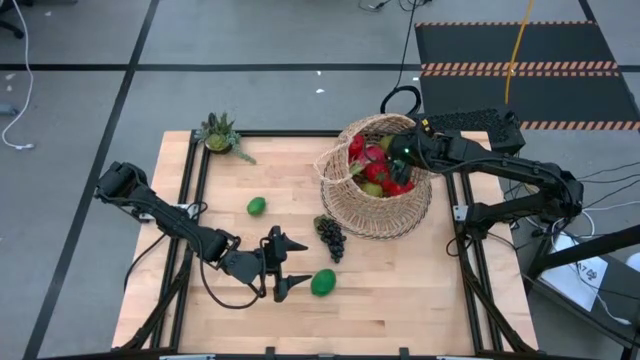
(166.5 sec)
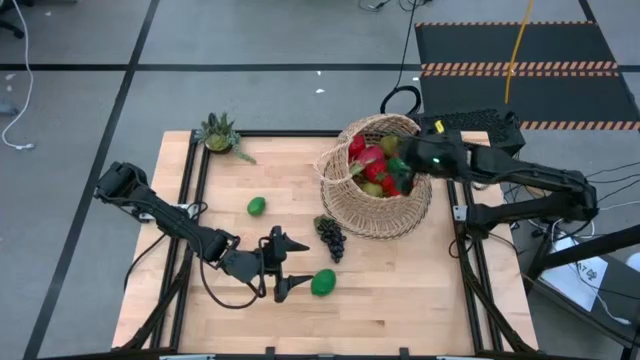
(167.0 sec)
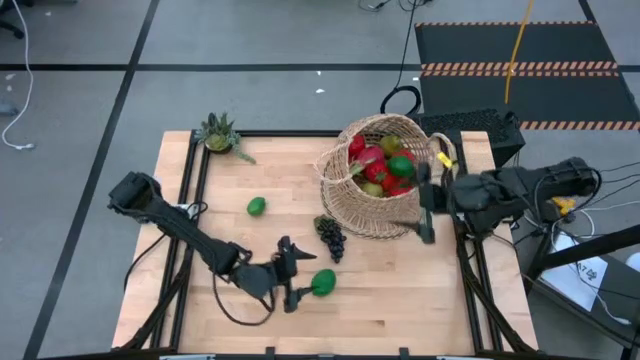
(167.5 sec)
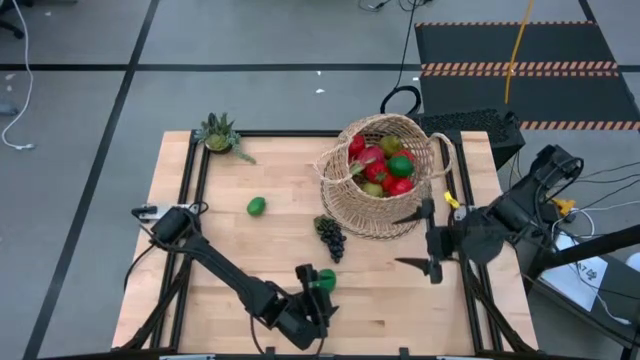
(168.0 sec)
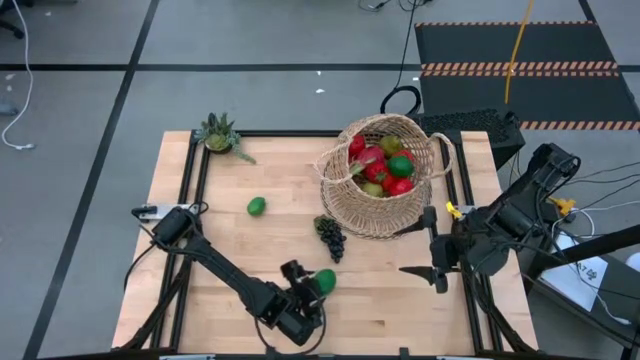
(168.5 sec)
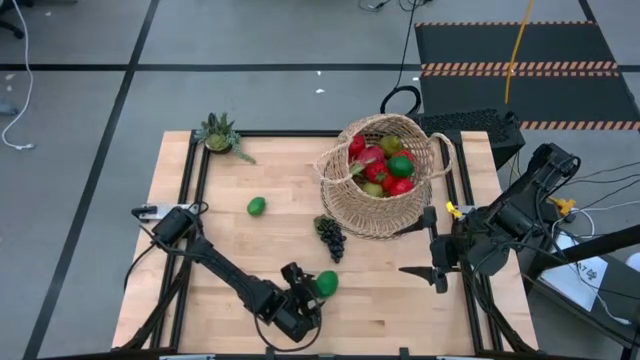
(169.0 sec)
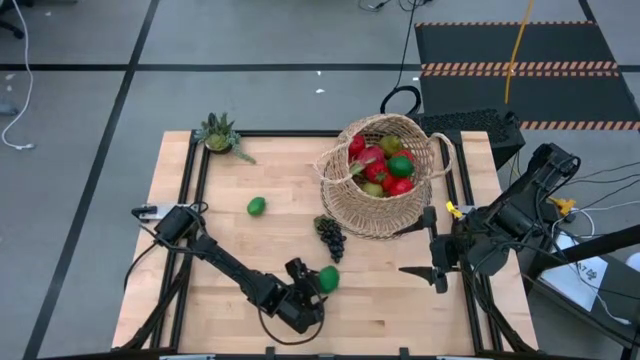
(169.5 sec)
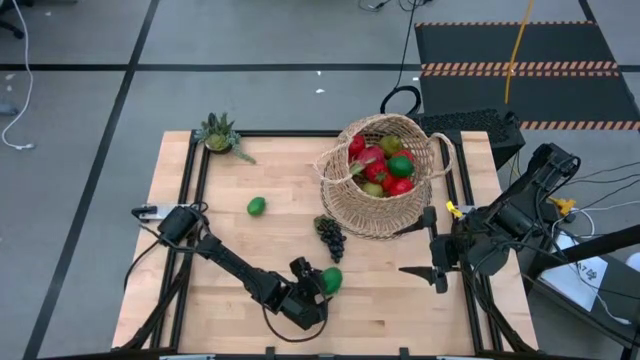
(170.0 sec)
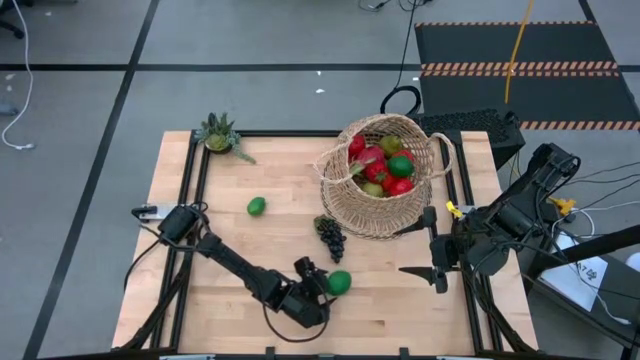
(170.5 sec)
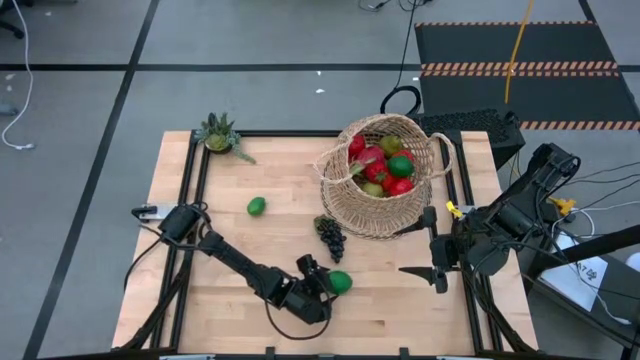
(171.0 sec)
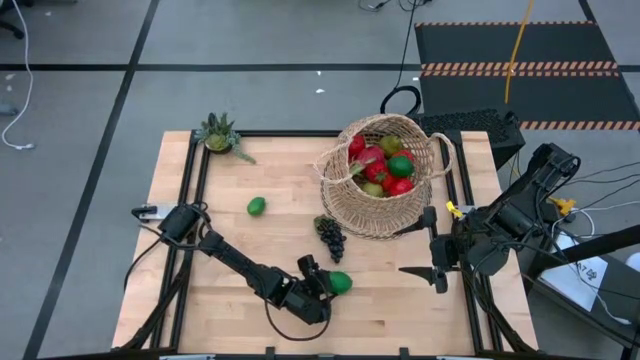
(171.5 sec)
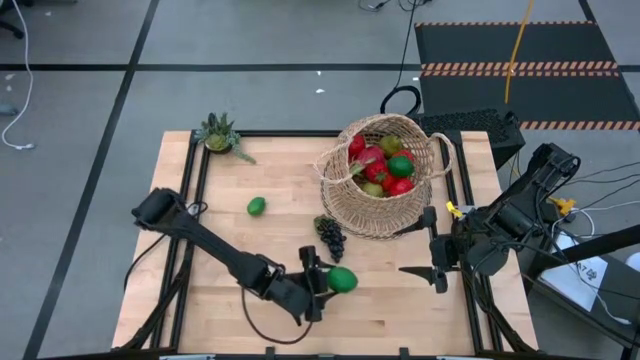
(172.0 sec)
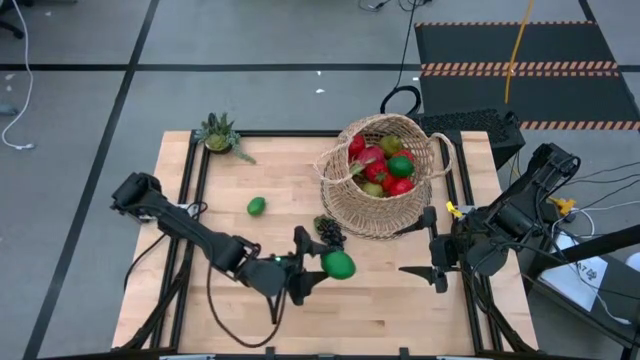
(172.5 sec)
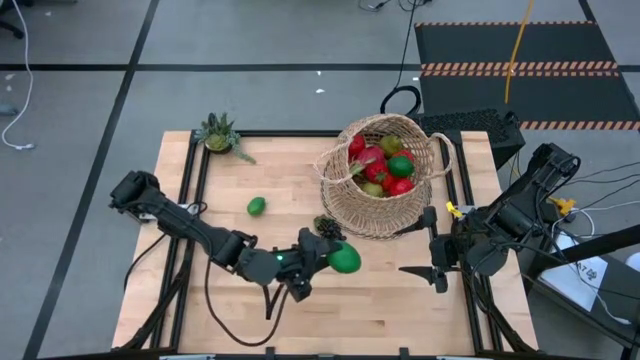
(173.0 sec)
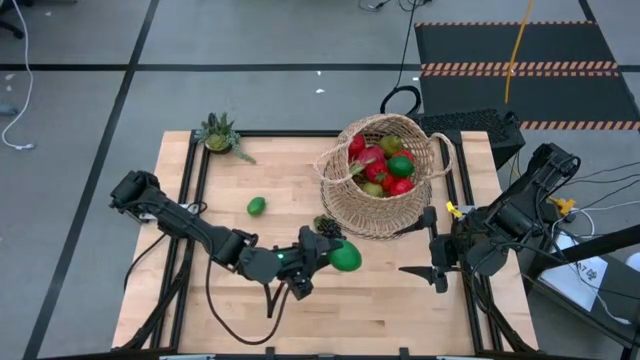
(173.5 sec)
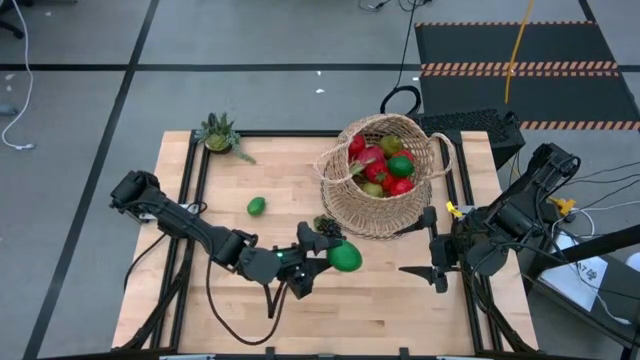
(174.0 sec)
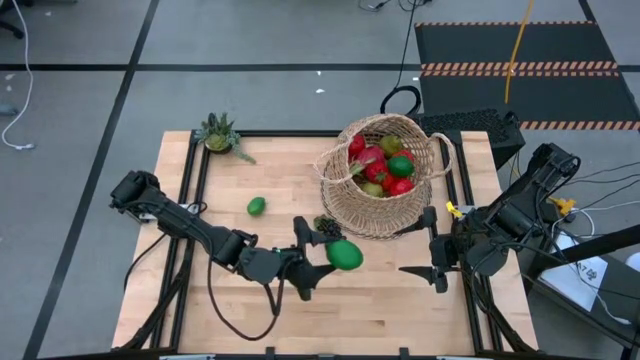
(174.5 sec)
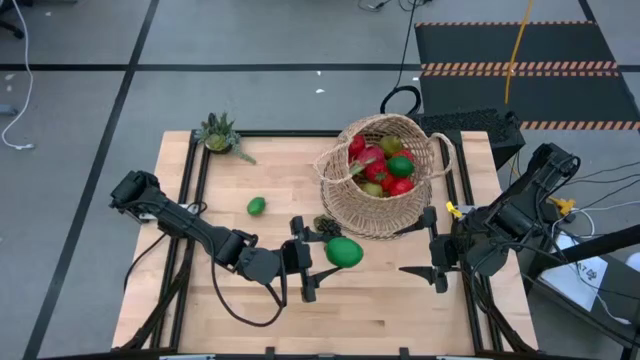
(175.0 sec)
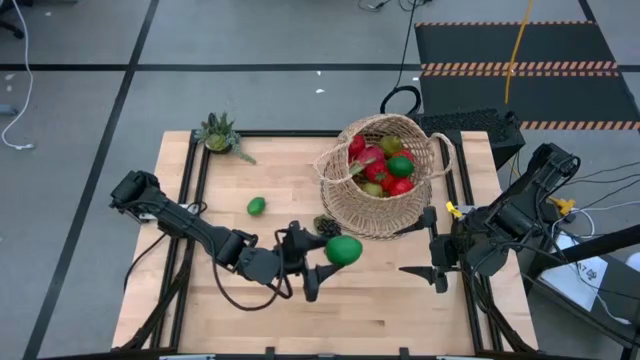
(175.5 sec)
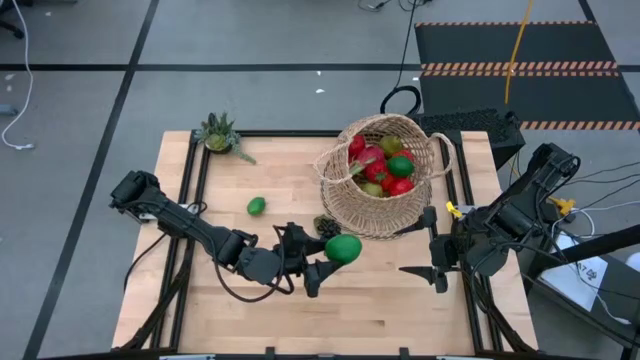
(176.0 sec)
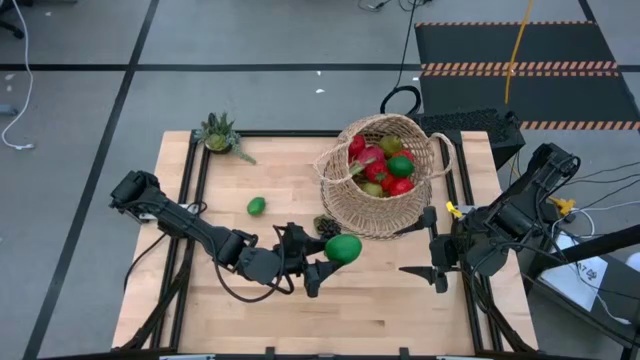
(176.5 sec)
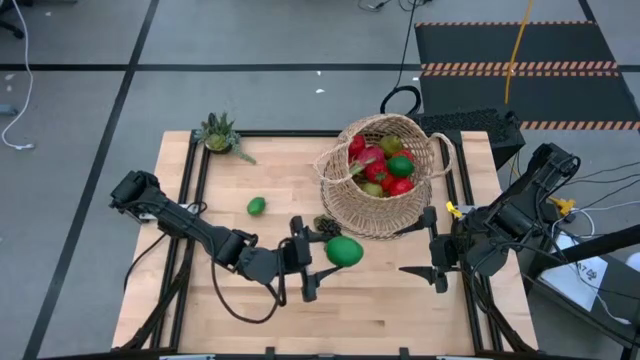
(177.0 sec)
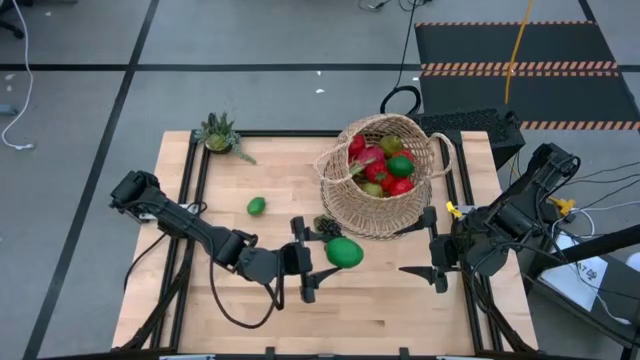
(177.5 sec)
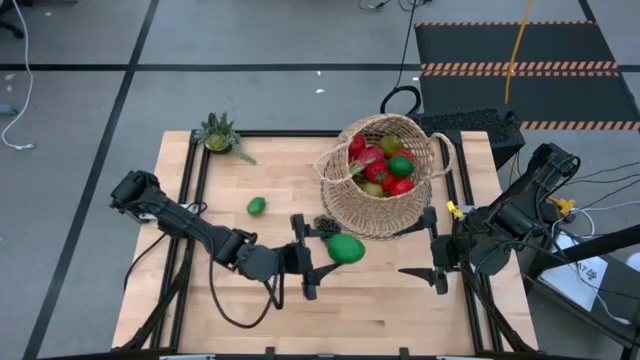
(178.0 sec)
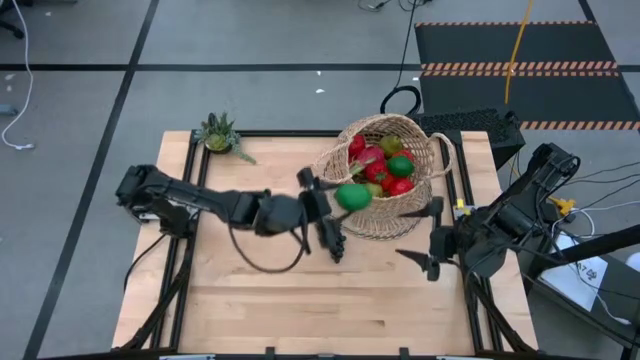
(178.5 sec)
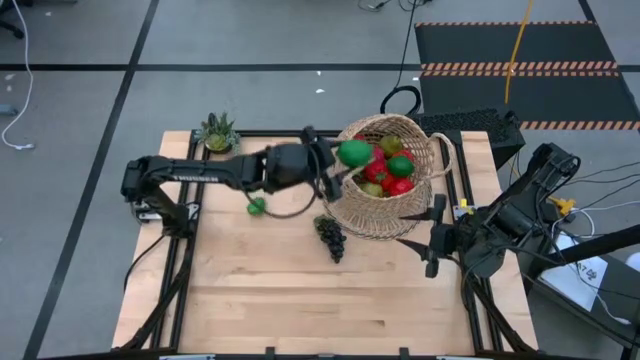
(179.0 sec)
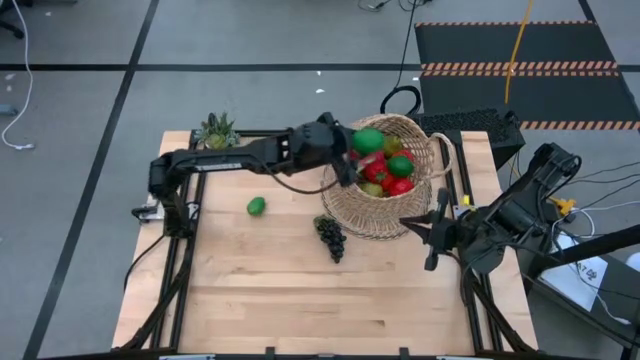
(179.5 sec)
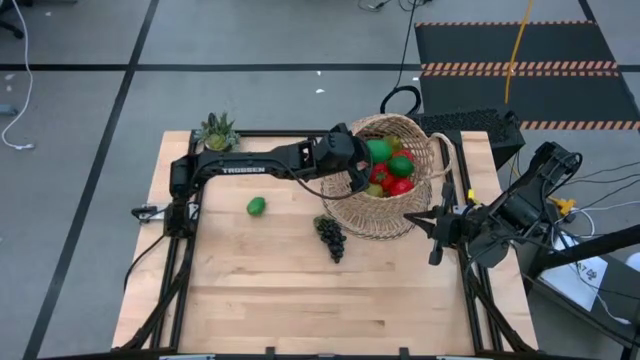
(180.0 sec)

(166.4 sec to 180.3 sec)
Task: Build produce basket
Put the green lime into the brown basket

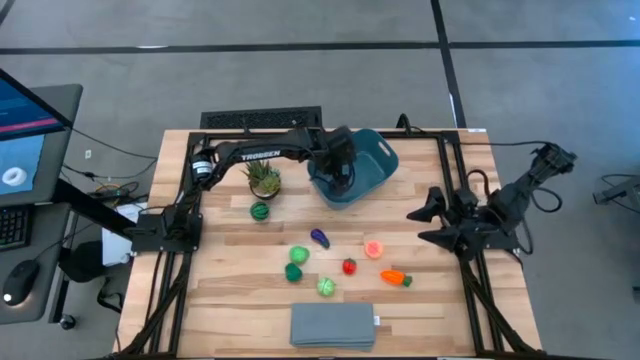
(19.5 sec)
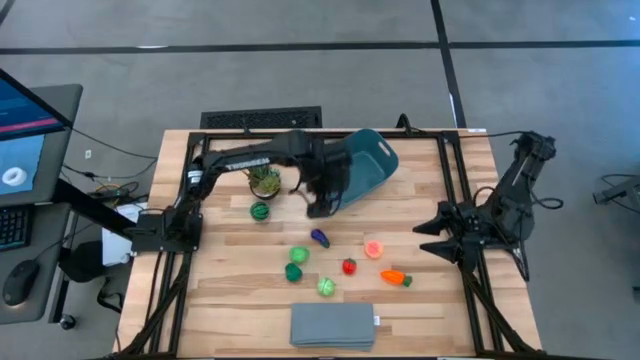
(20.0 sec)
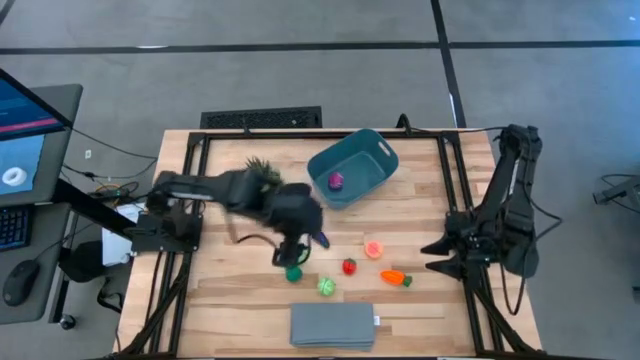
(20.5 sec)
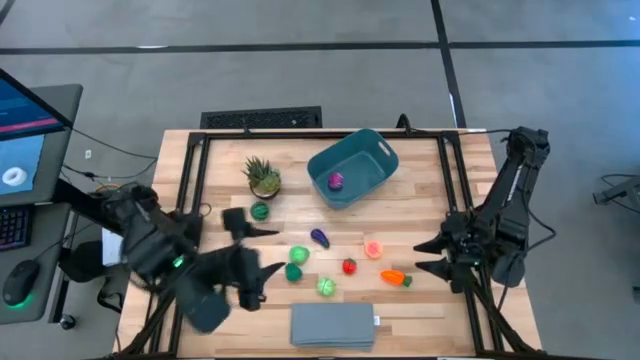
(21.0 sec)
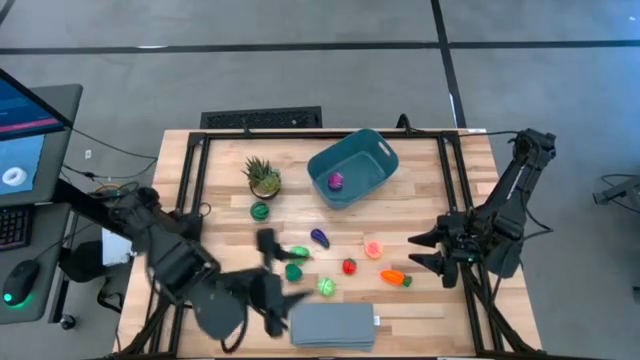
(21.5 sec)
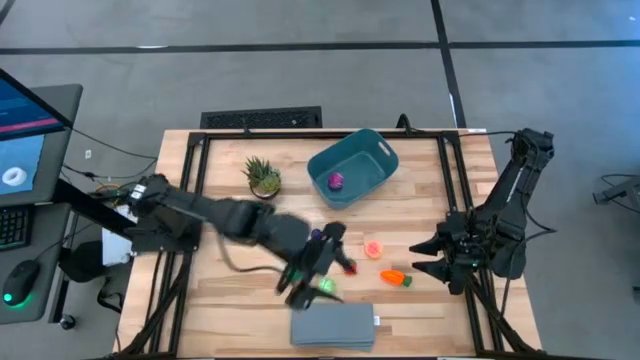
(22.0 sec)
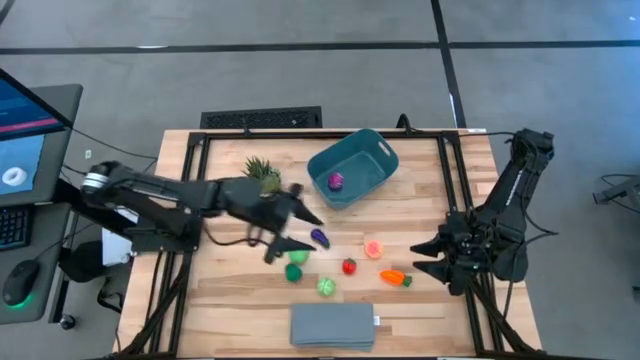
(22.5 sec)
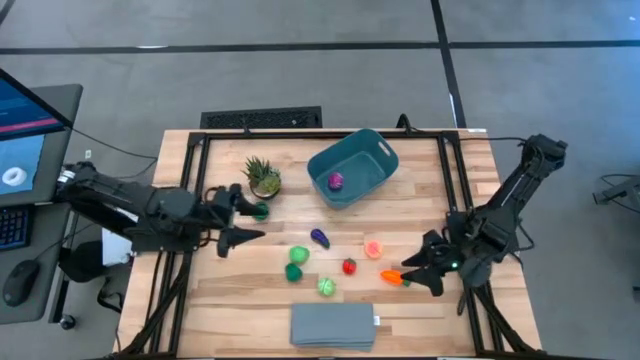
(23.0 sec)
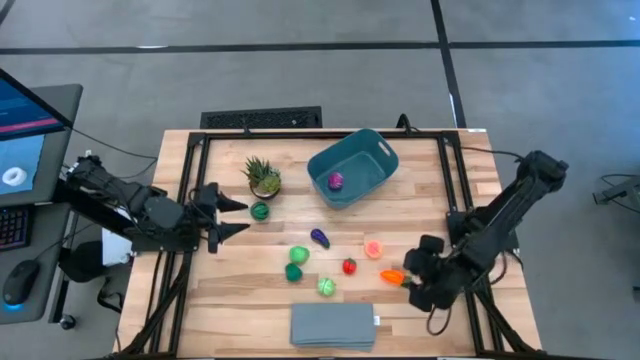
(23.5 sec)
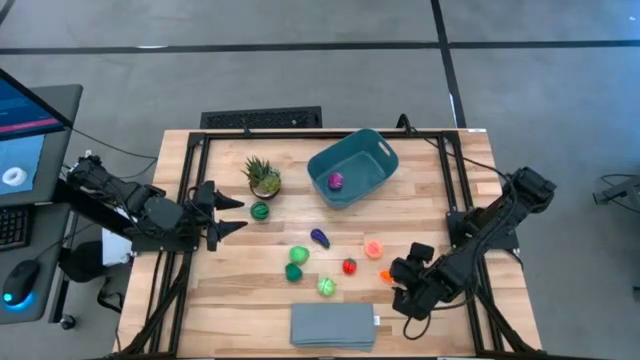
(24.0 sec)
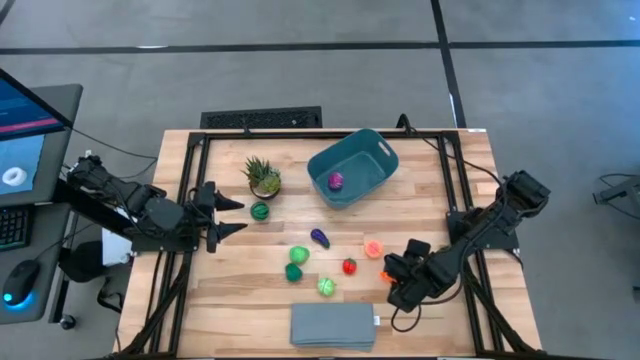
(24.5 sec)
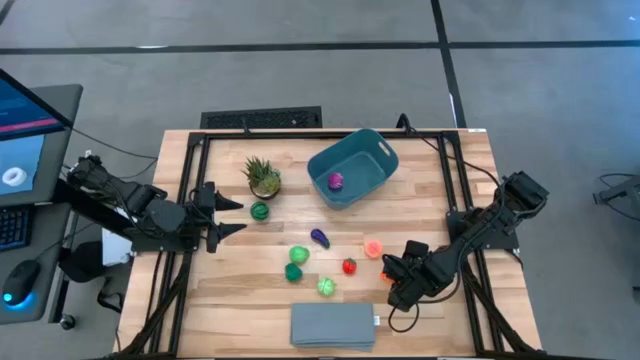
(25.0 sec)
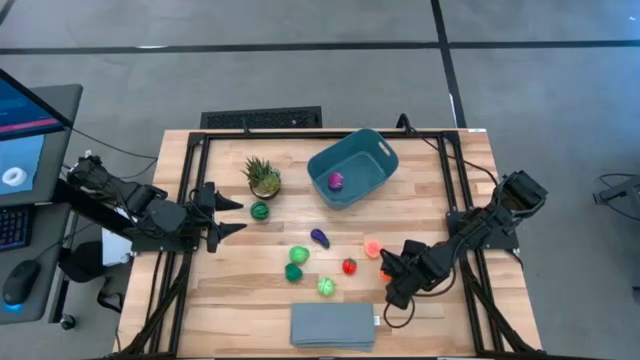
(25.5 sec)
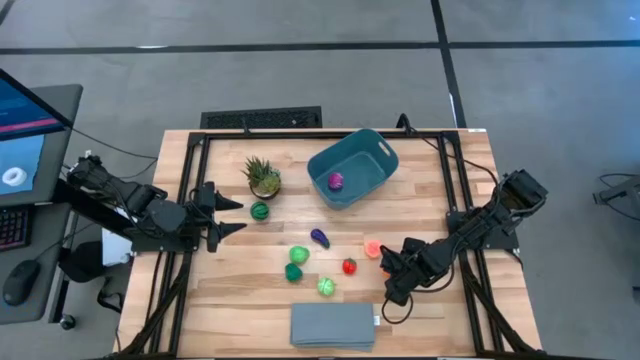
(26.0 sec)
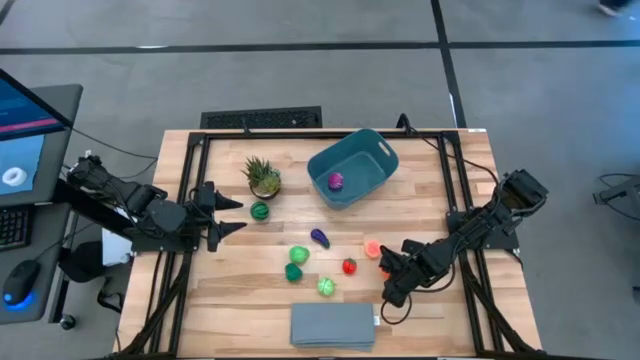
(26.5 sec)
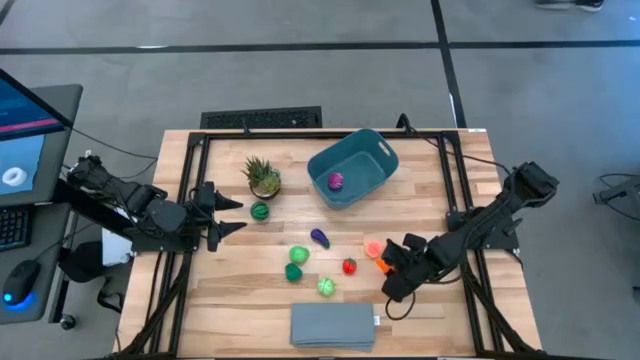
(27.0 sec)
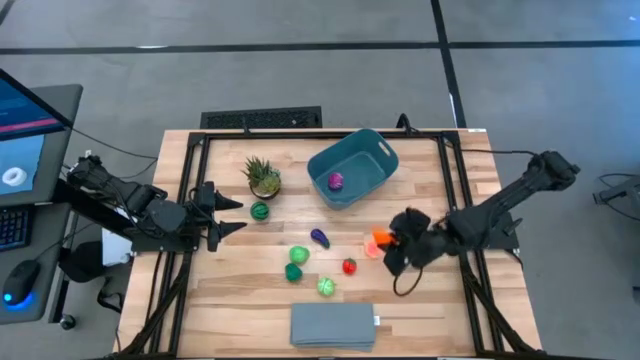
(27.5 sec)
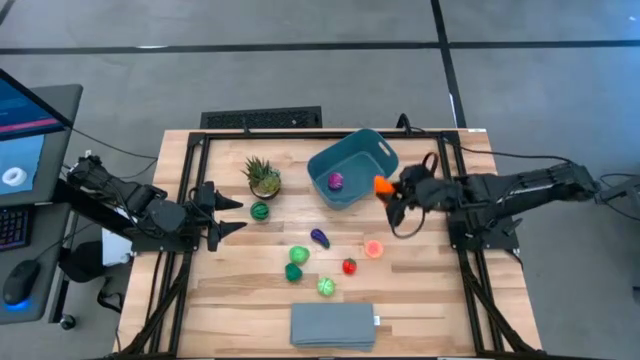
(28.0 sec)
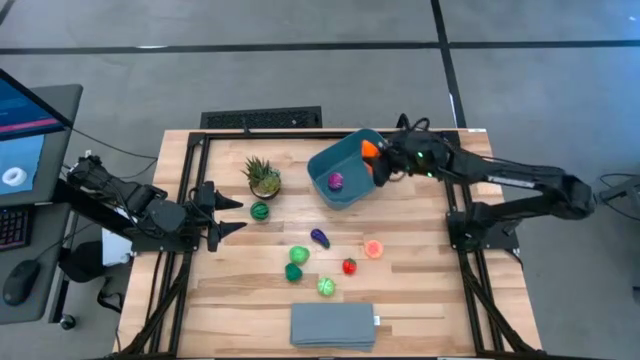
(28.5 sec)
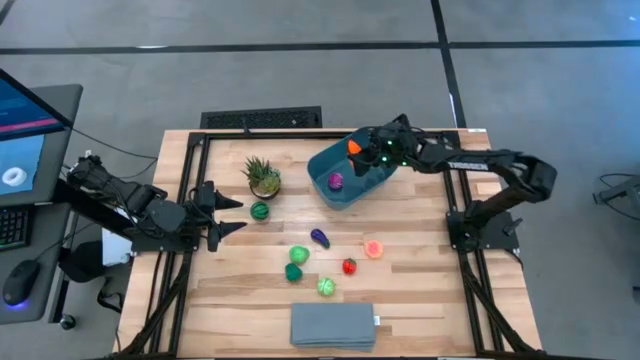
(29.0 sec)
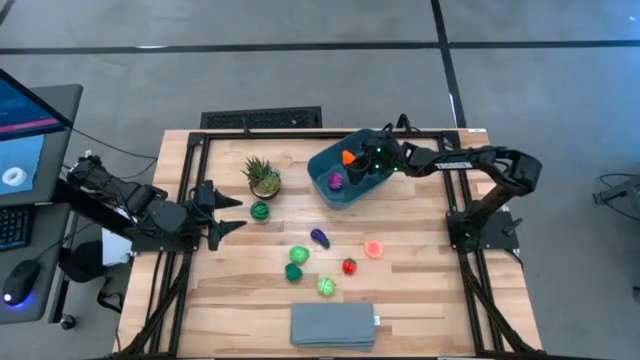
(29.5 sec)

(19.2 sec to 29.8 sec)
Task: Pick and placing Produce into tupperware
Put the carrot into the bin
